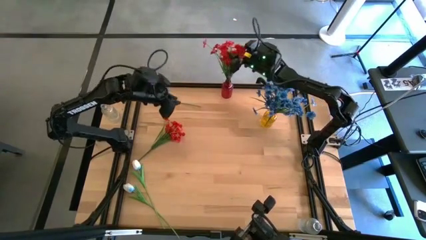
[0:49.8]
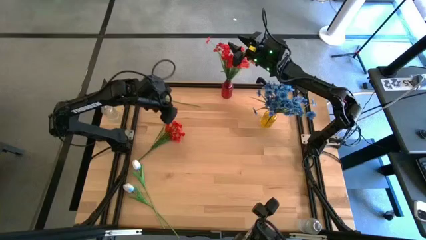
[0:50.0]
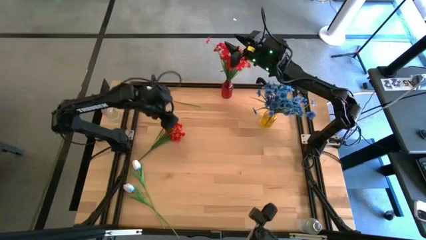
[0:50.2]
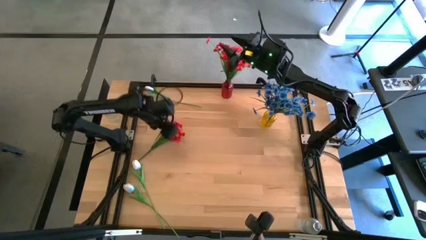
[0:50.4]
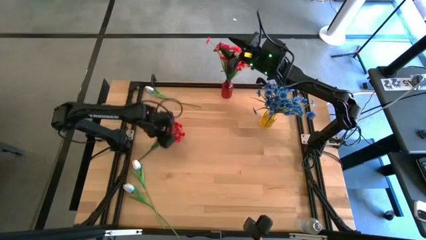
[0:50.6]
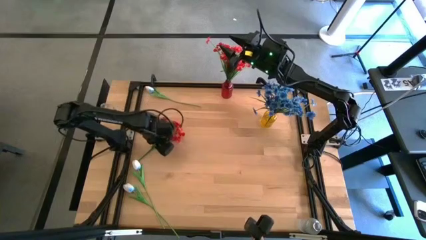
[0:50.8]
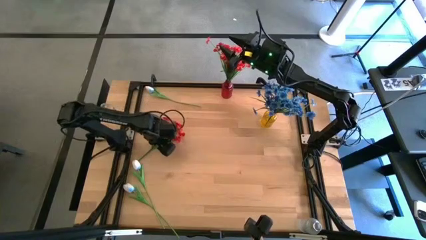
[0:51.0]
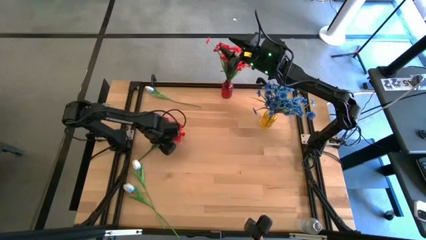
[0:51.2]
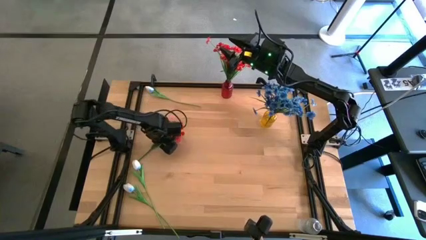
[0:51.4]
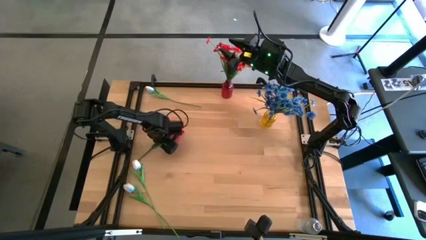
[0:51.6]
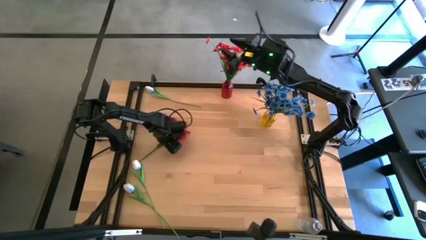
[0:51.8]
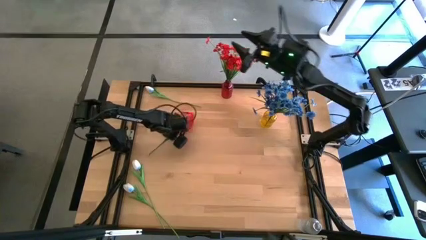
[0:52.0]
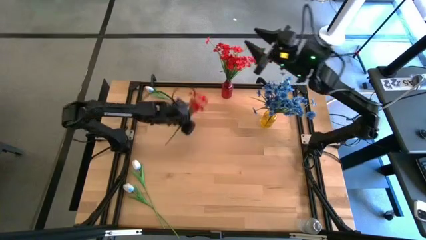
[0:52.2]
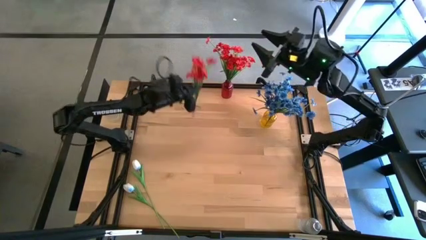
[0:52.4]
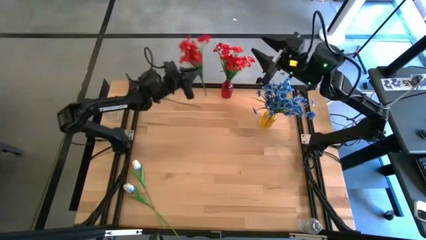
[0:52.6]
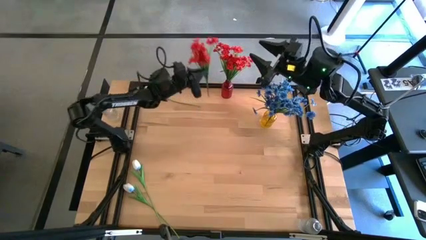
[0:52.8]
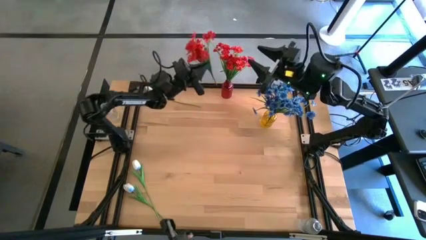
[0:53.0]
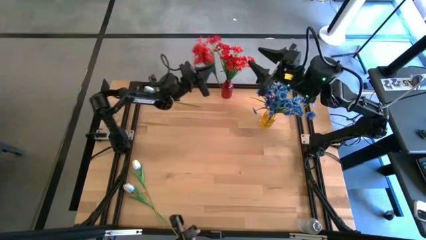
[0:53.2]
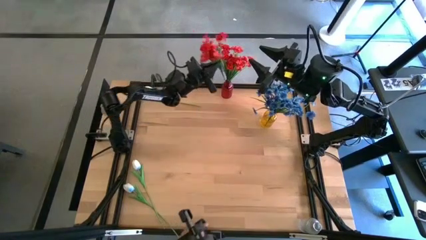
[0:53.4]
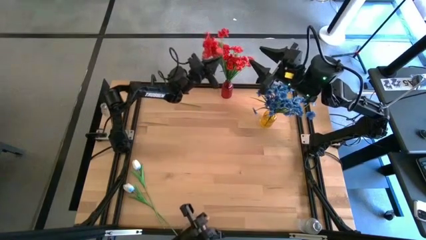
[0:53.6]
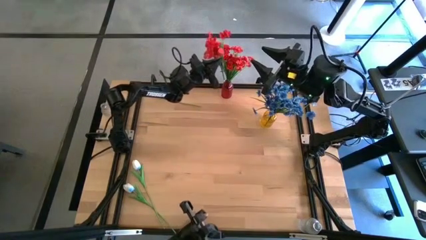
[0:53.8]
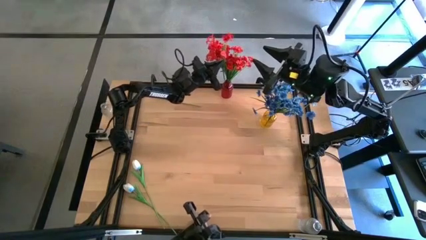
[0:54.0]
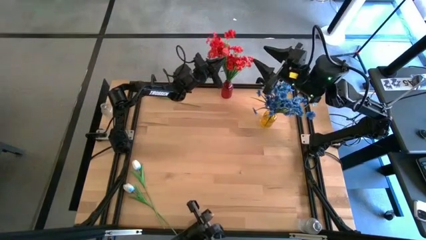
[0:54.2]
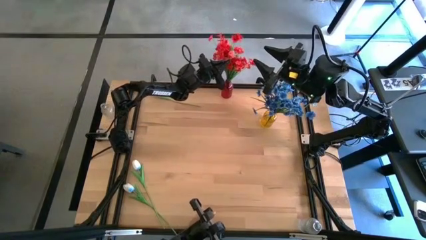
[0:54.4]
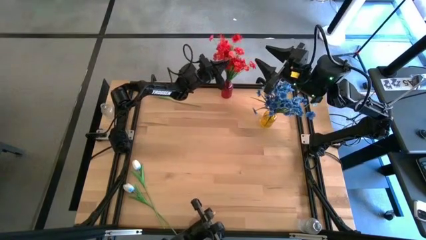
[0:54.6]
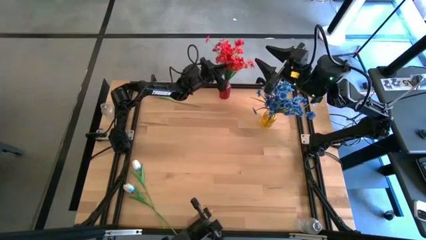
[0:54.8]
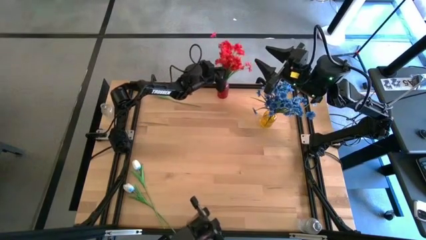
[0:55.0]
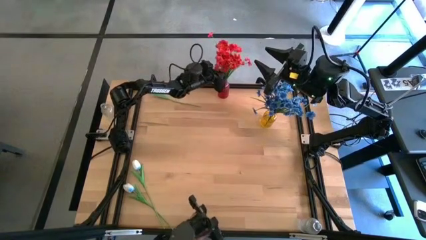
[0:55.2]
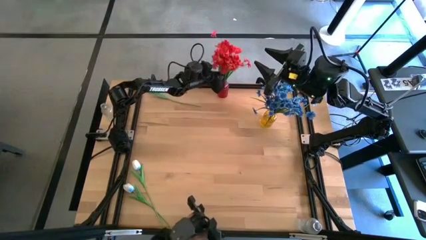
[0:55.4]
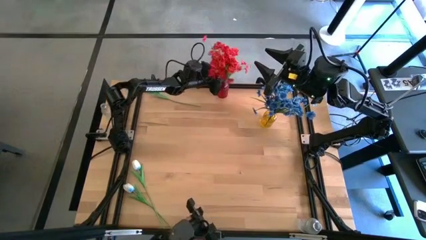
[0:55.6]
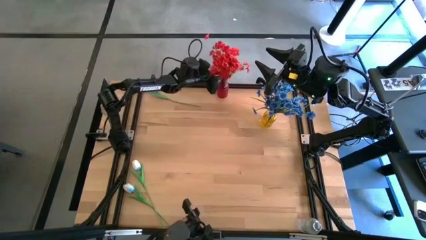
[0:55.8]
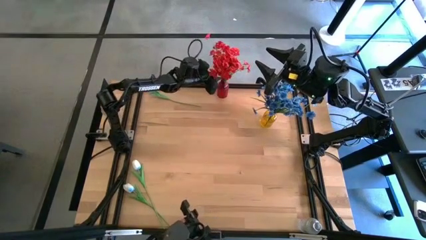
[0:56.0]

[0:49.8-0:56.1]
Task: Sort flowers into vase by color
Put the red flowers into the red vase

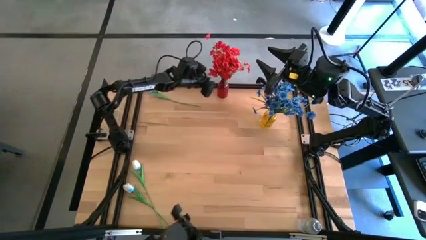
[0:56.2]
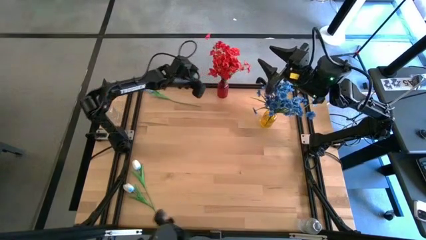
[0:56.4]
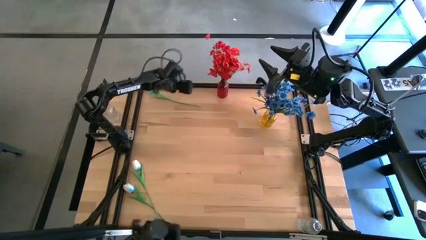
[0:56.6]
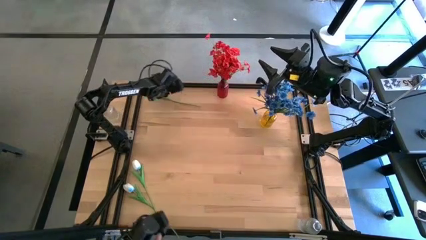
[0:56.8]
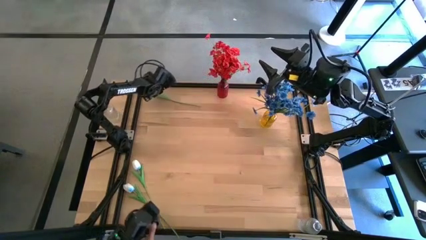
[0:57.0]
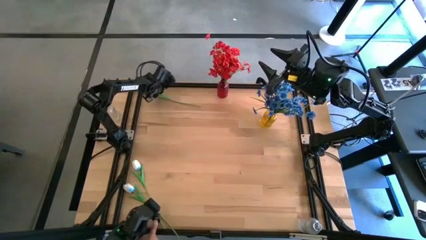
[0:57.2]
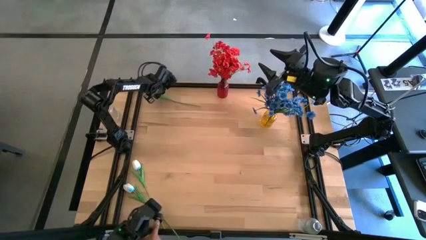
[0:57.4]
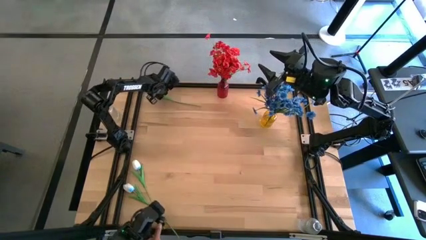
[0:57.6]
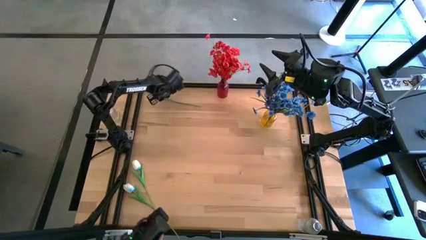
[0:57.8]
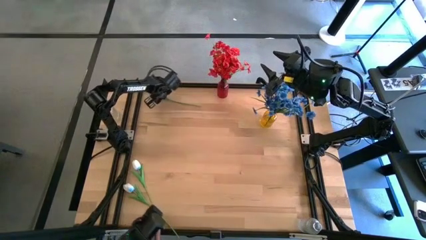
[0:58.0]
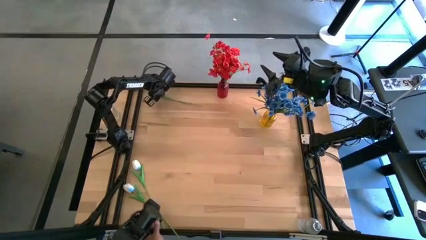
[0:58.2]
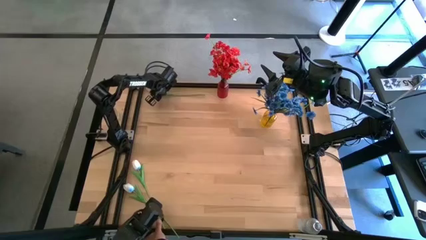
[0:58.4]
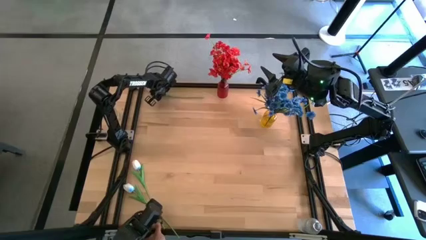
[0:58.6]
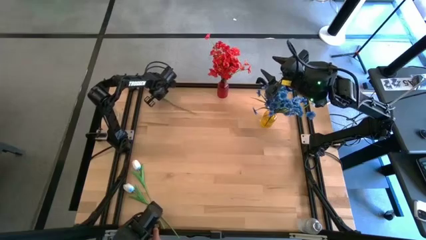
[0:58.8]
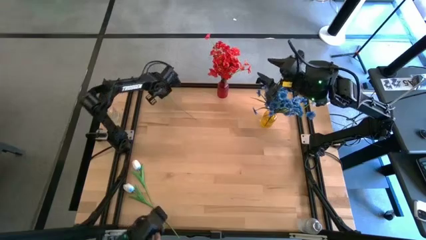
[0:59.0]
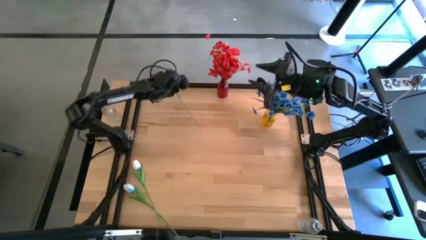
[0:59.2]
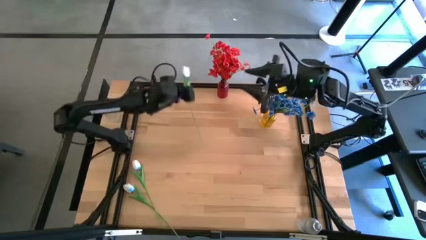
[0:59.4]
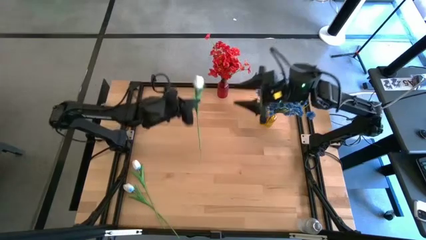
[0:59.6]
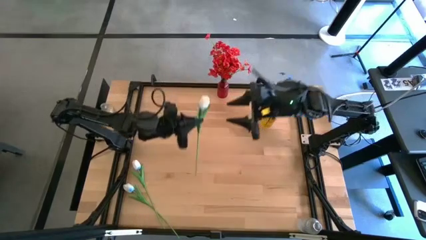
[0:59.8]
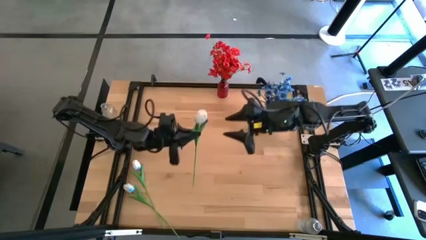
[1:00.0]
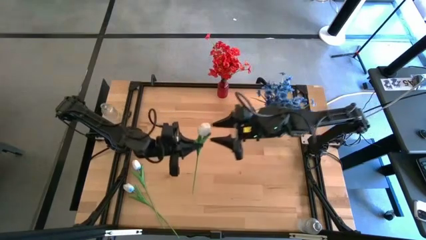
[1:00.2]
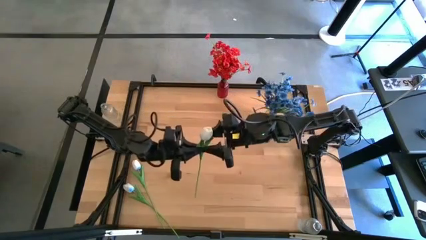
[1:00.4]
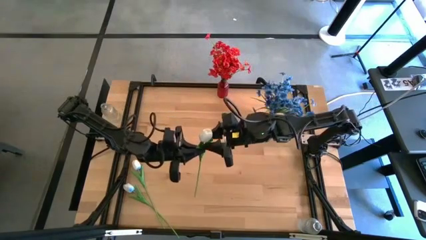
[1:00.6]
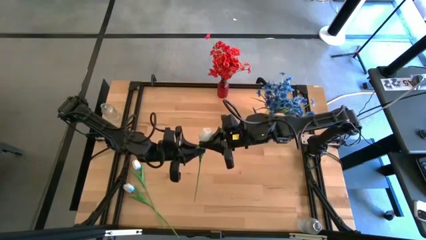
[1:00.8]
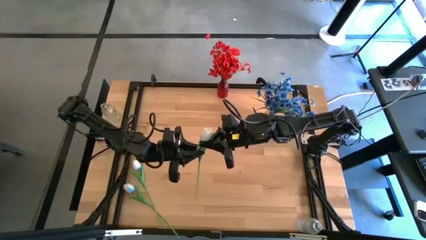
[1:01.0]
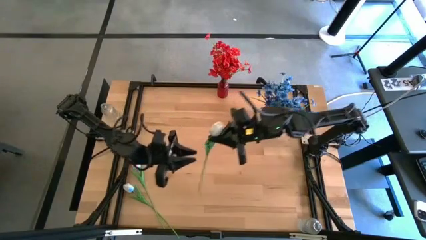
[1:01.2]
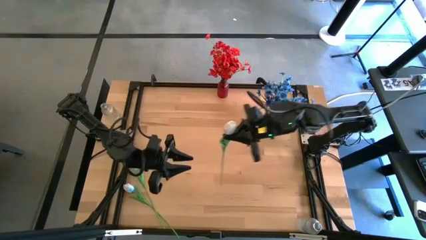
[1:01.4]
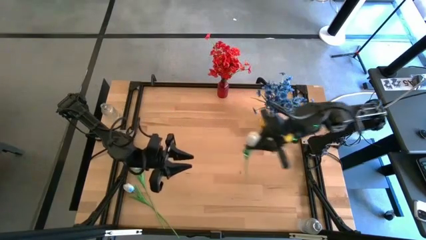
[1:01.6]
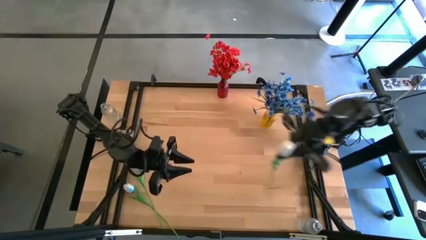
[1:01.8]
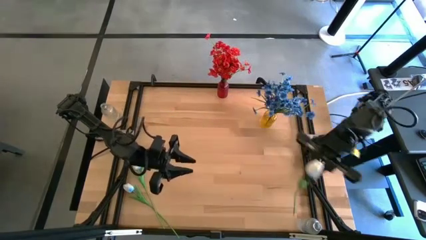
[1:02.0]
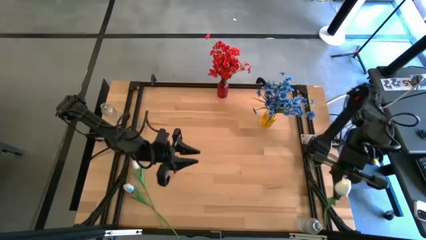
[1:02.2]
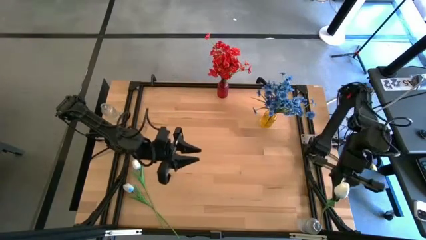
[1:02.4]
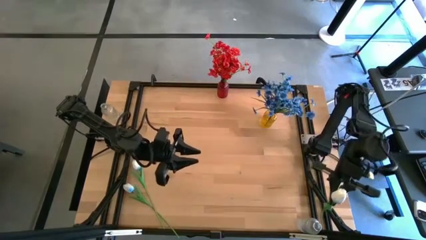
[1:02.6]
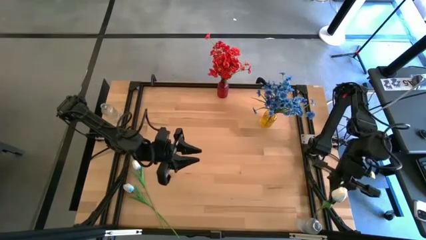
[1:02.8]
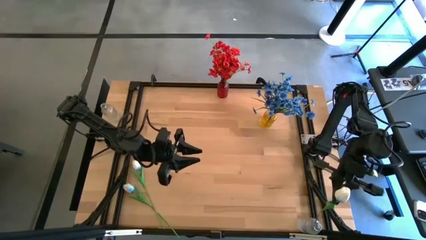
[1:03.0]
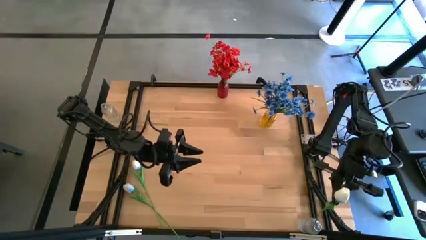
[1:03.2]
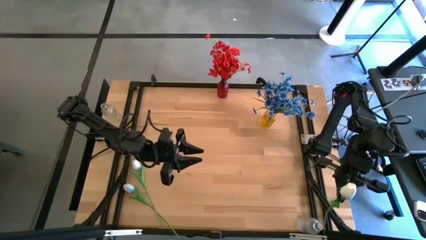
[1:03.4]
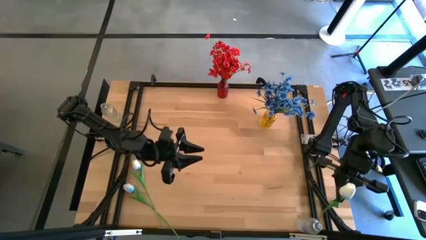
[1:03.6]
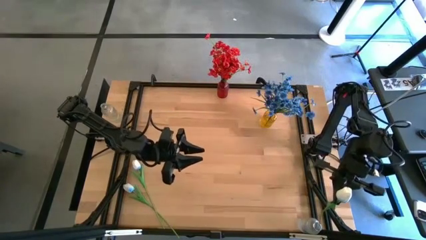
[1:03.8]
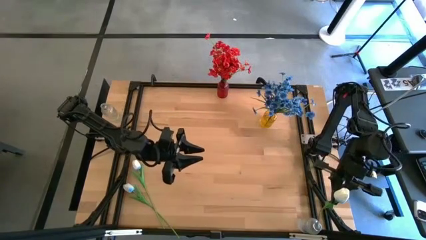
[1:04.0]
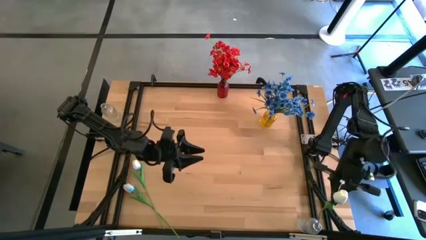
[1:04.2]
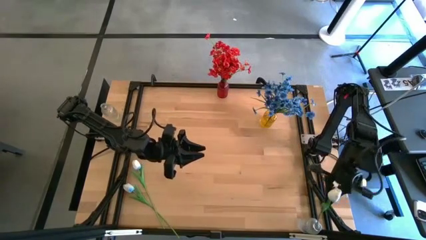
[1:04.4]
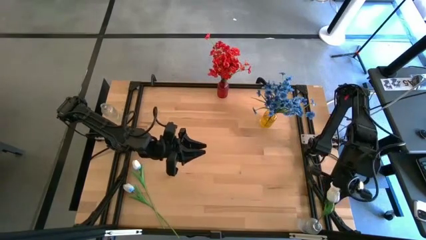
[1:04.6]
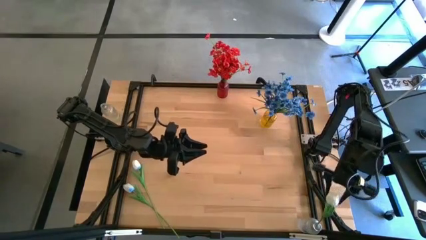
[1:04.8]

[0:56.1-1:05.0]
Put the top white tulip into the transparent vase
